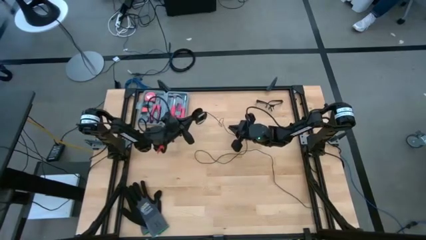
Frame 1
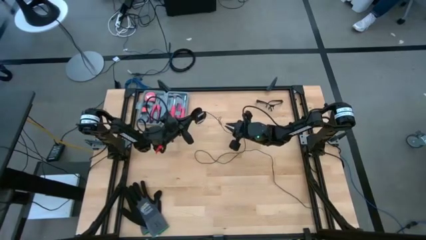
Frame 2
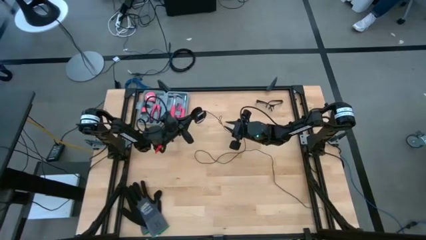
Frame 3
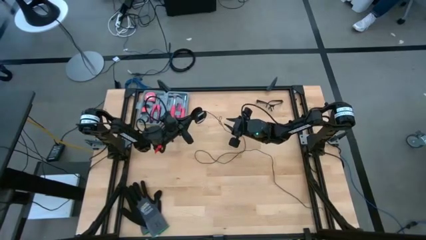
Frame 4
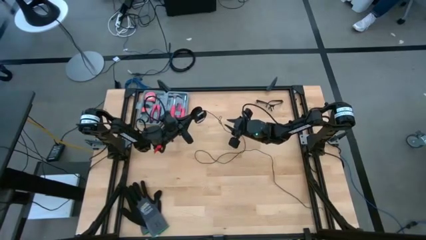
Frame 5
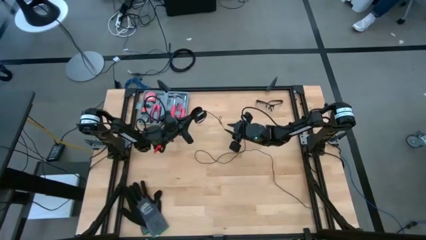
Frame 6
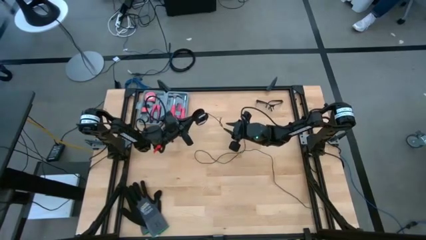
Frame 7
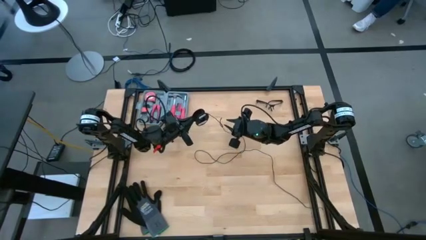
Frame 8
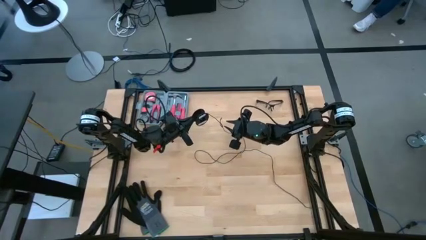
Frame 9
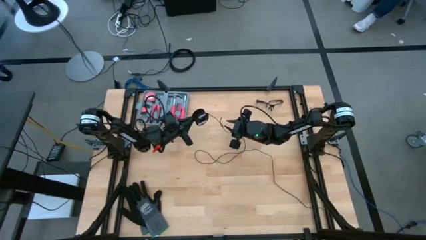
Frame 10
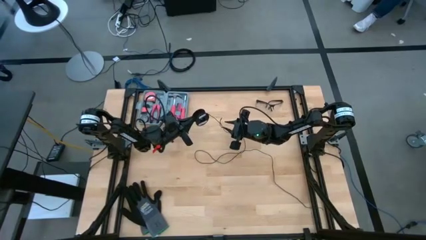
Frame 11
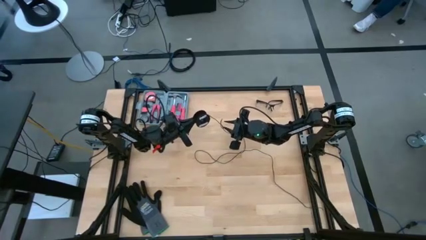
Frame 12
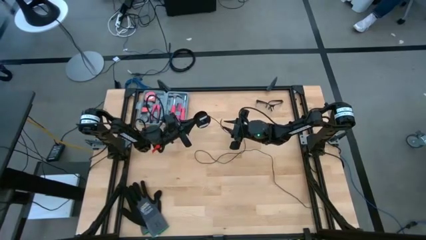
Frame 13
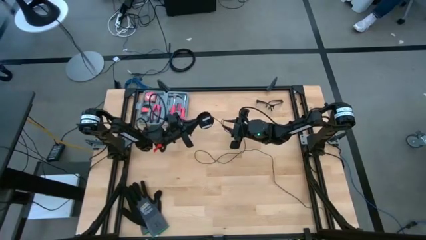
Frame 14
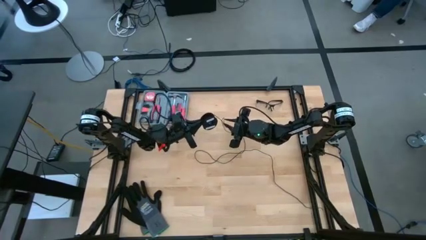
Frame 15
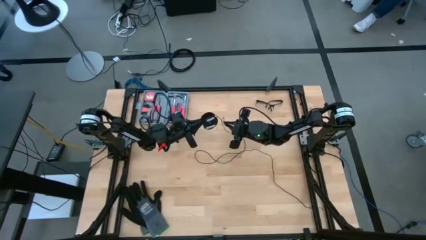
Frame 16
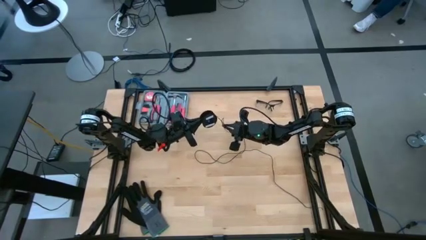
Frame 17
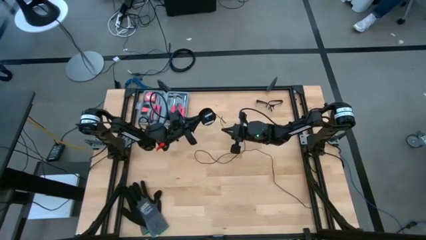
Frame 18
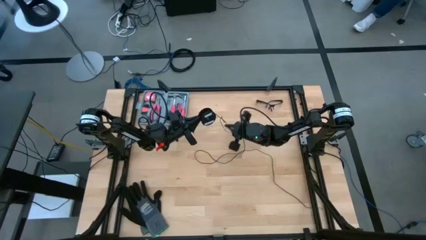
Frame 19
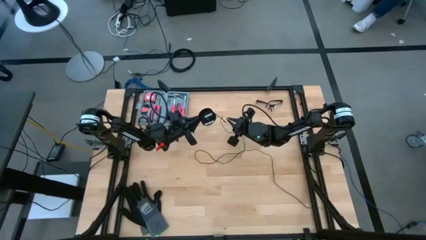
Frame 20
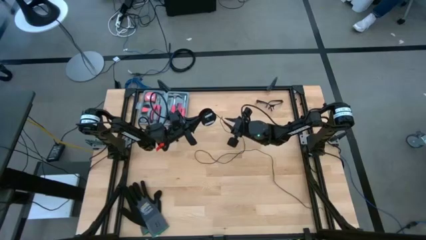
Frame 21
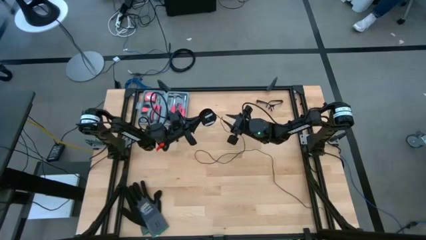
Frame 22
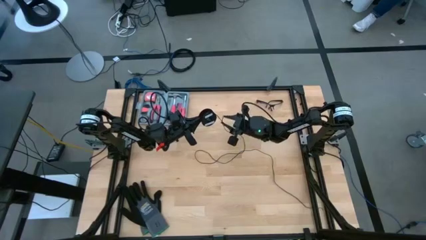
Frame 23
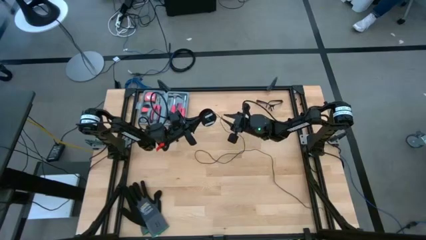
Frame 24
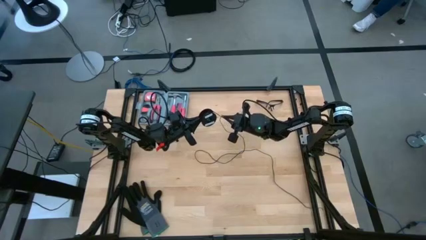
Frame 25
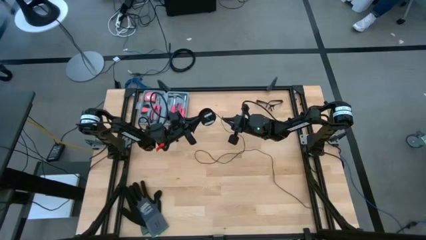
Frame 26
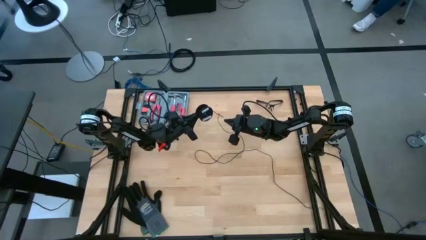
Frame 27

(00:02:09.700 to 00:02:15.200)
Task: Coil cords
Coil the black wire on the black spool

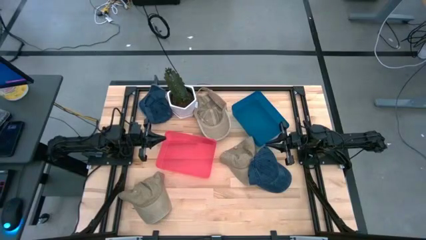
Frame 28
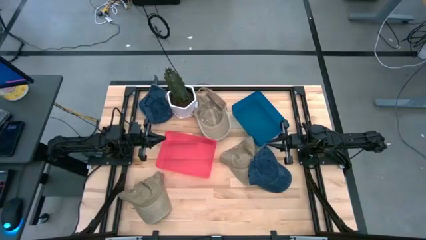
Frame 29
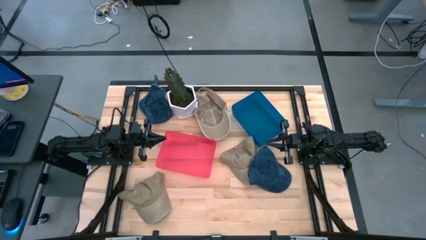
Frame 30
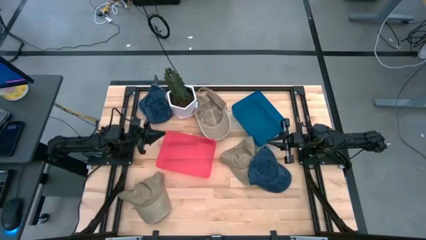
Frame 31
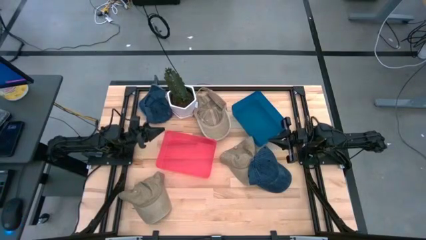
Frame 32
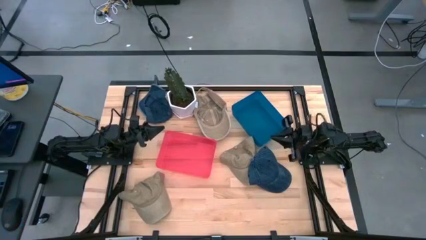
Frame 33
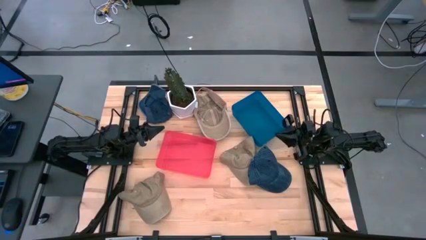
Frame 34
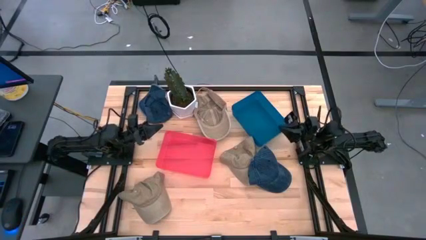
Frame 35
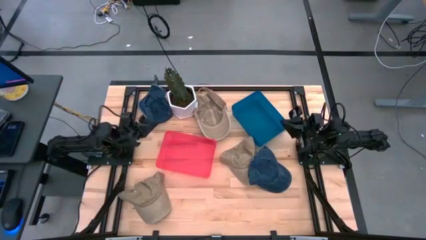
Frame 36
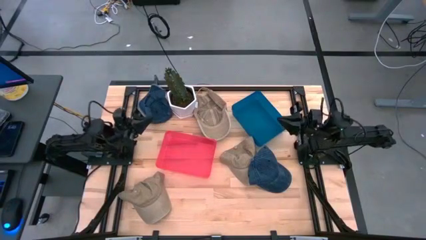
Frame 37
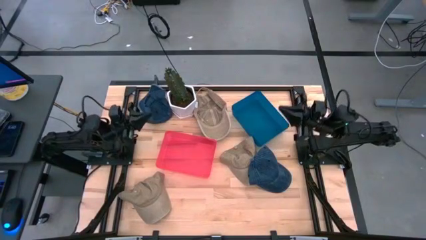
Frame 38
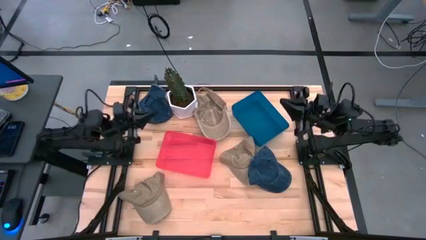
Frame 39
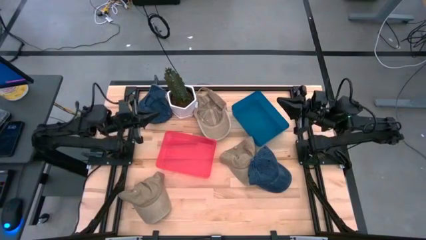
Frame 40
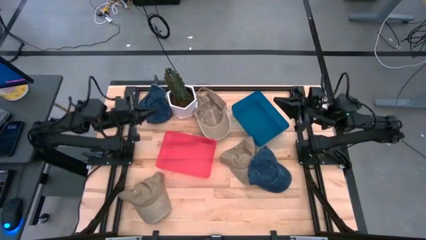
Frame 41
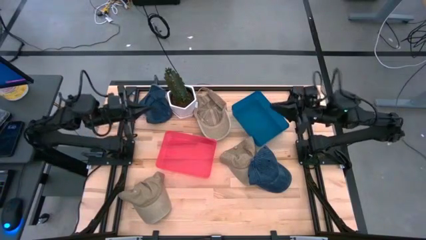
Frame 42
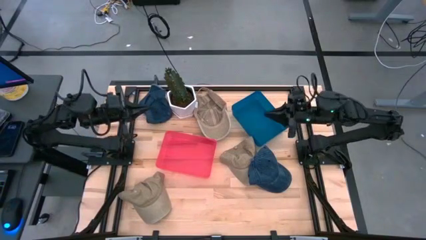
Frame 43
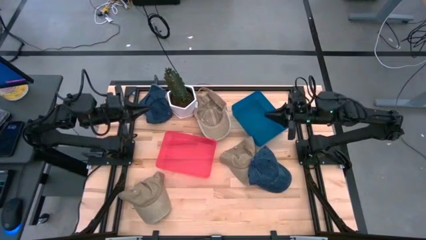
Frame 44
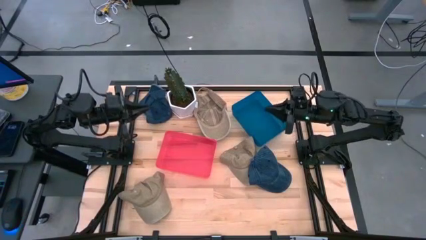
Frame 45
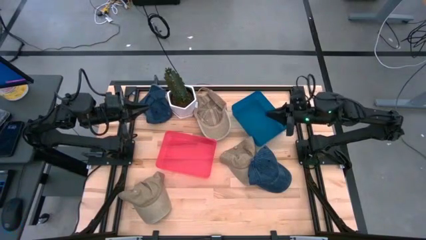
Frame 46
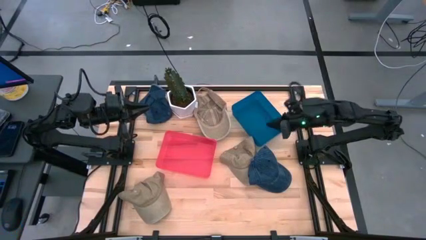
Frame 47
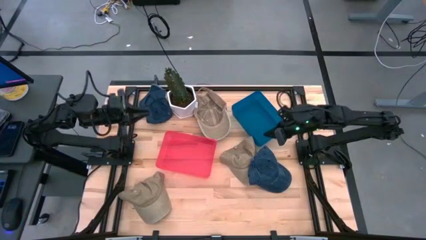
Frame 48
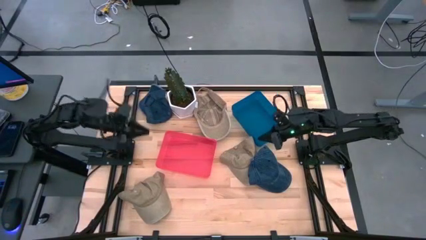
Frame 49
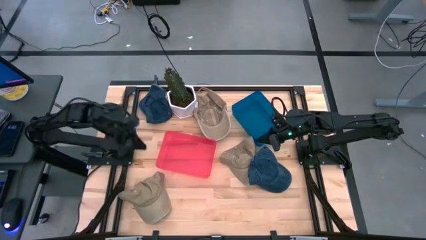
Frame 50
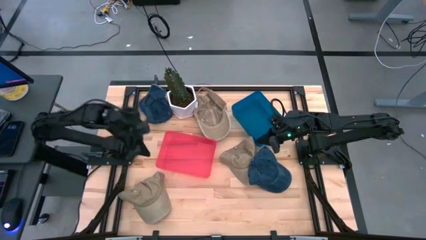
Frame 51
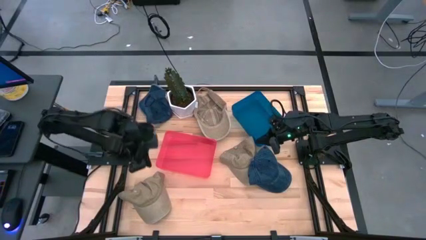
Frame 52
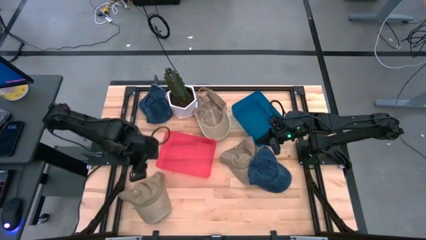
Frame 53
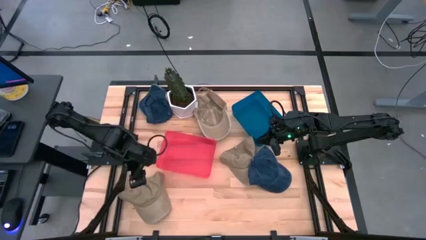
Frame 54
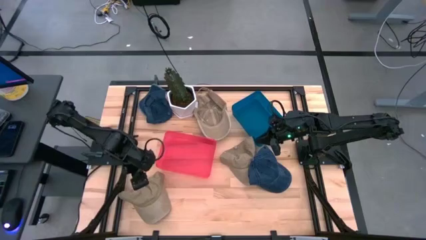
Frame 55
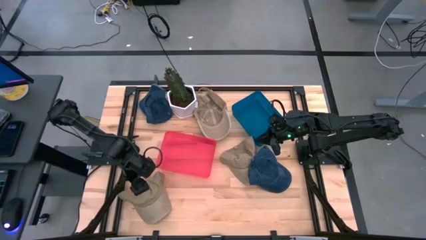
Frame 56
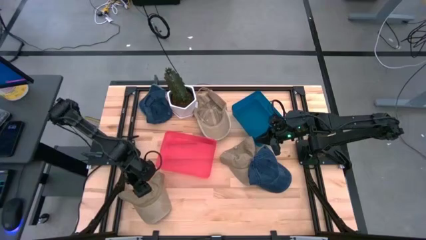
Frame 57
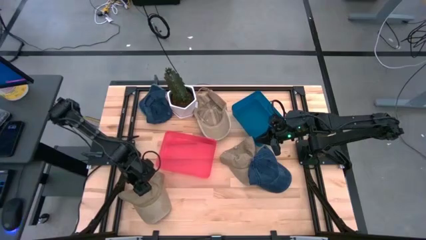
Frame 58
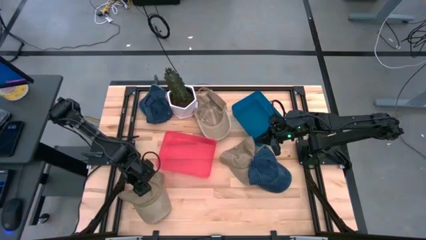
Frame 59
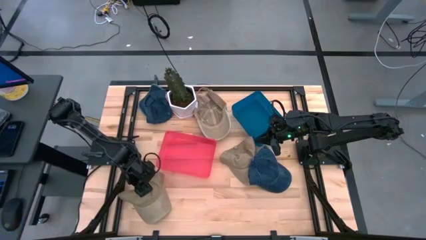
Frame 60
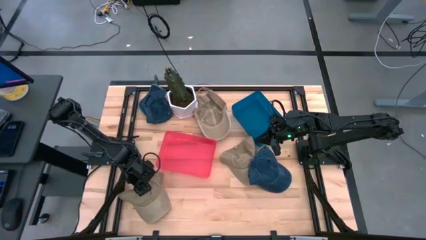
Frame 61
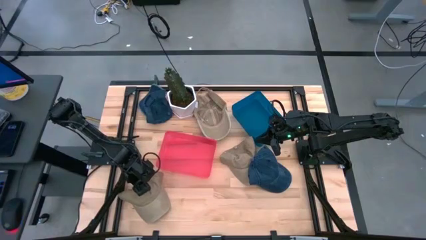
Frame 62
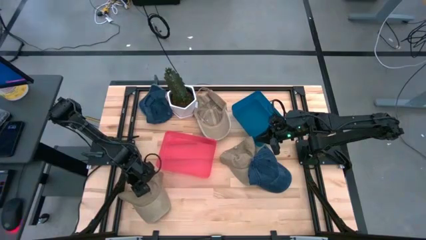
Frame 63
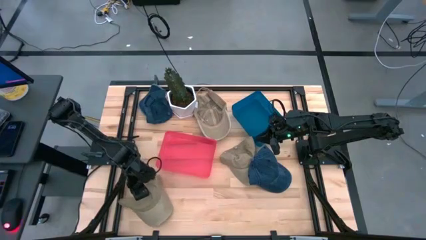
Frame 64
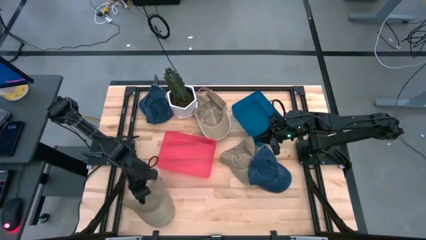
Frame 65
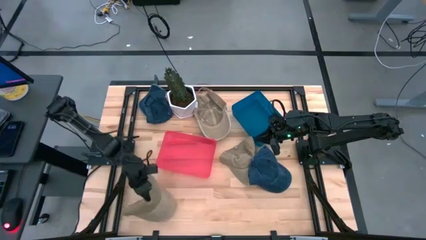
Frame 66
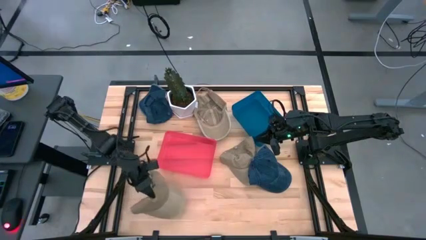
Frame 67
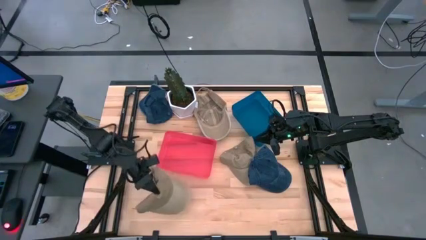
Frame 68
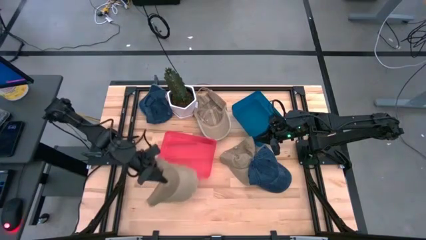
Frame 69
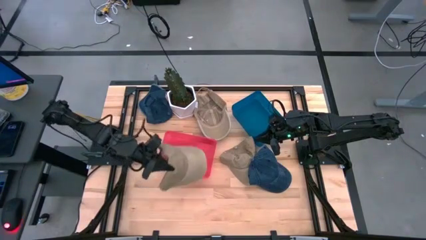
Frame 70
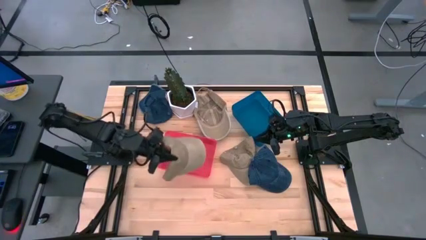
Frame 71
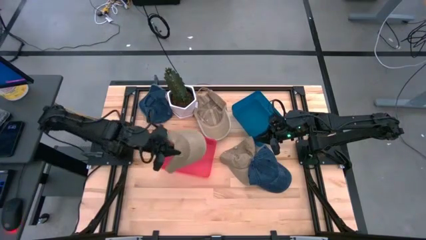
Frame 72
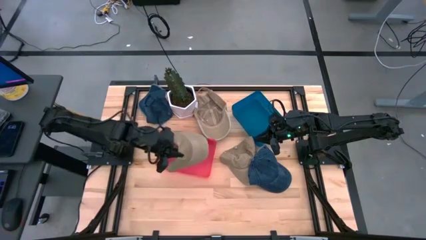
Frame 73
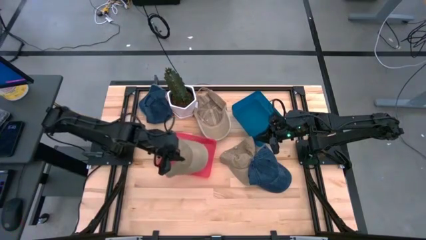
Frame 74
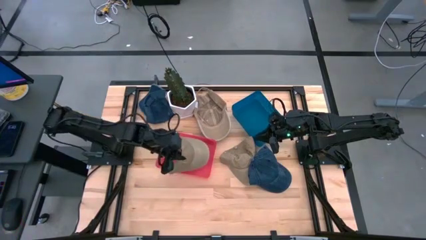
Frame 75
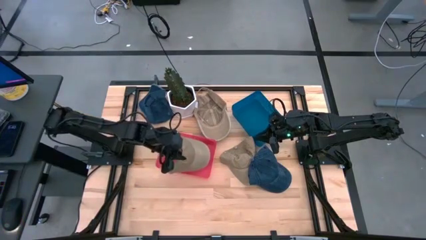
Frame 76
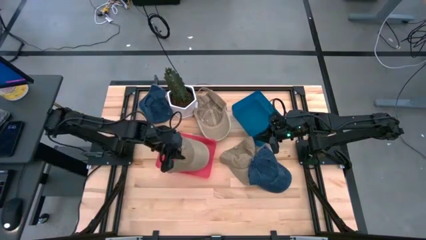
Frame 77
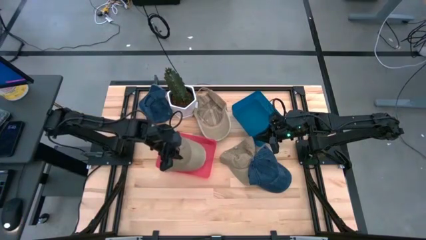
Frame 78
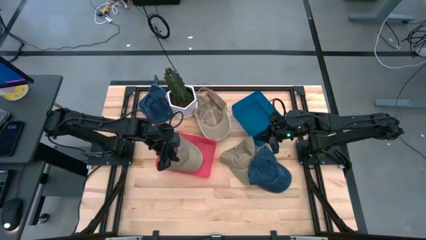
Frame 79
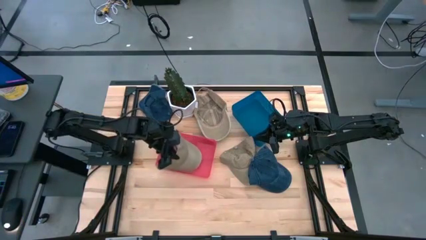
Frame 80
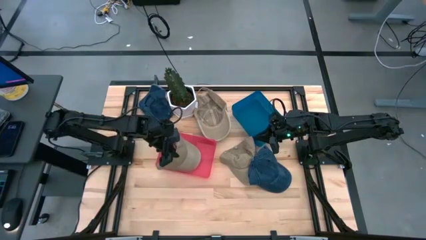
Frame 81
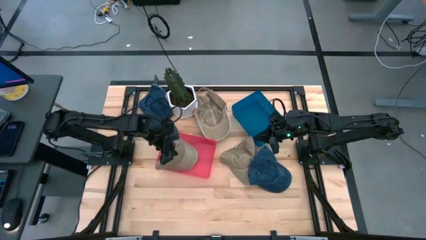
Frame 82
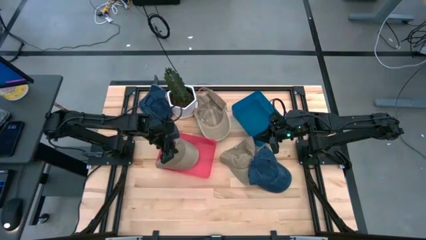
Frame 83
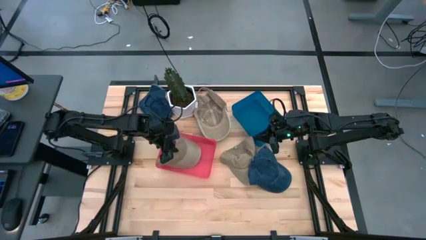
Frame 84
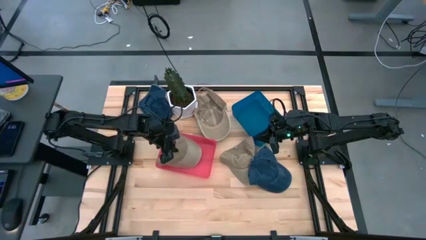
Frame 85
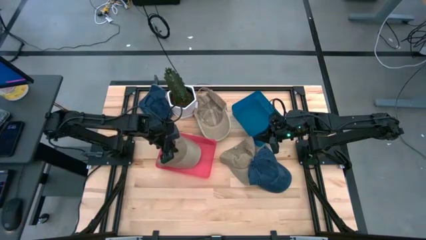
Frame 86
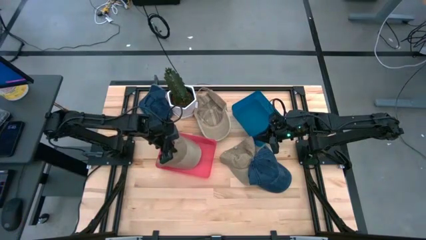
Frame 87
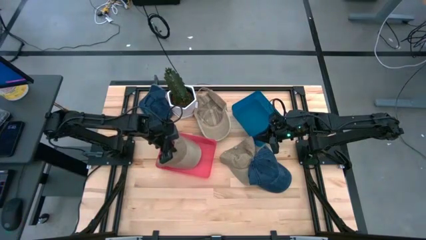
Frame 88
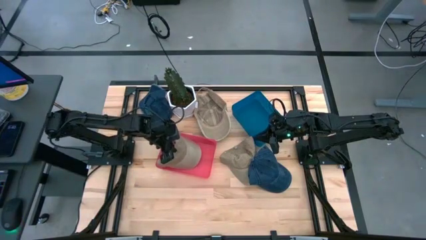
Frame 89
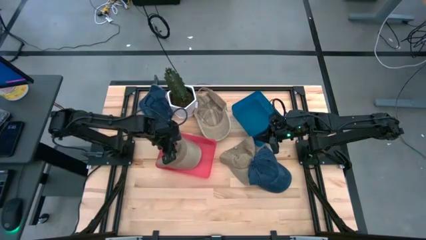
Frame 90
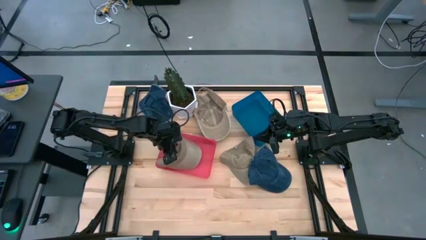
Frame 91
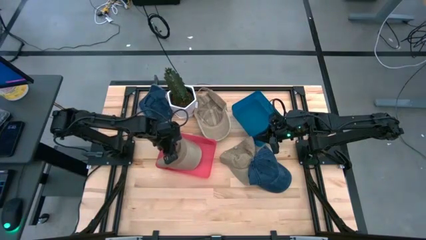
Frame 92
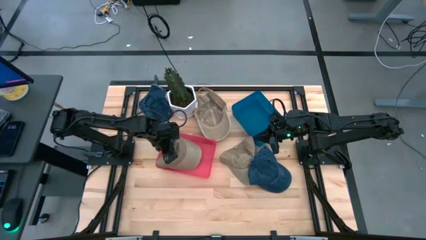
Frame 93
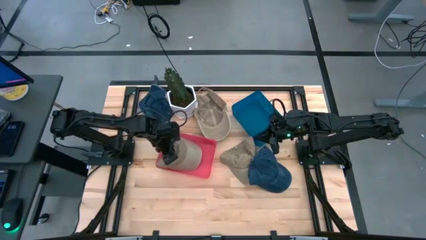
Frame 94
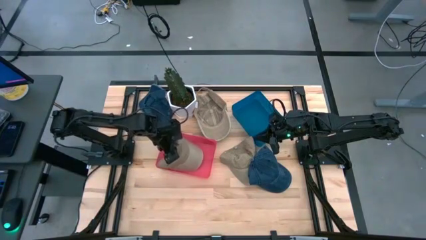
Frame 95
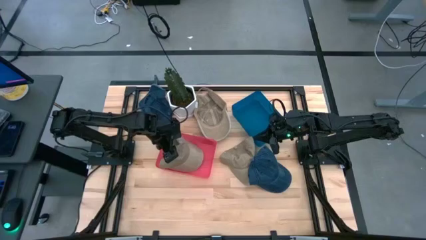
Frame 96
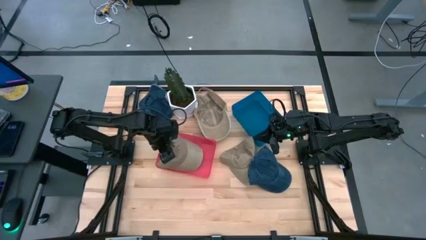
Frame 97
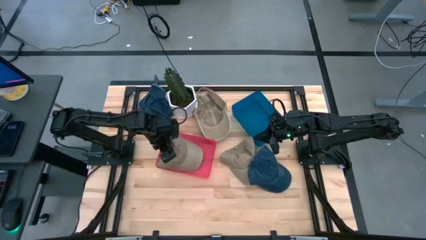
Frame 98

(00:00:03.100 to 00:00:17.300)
Task: Pick & Place hat
Put the bottom left brown cap into the red bin
